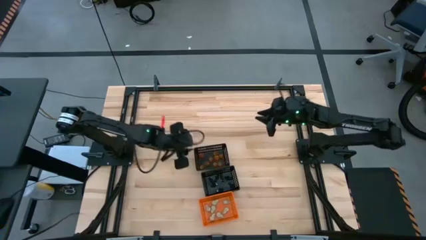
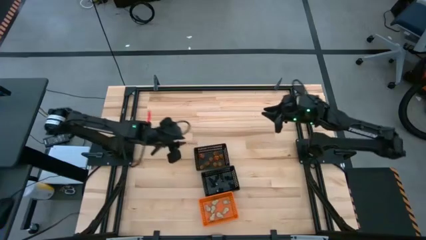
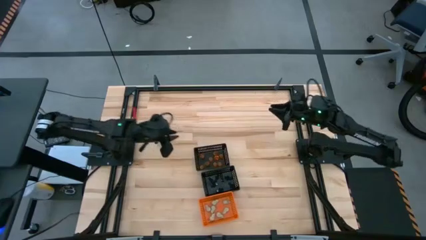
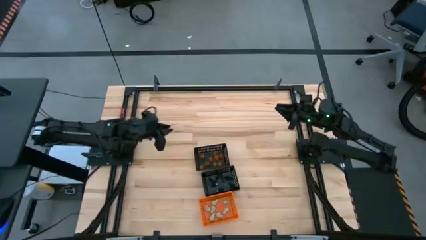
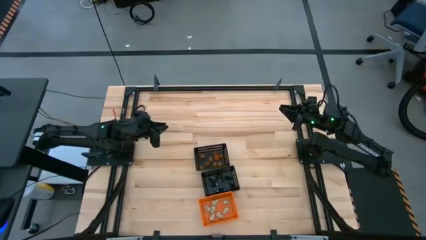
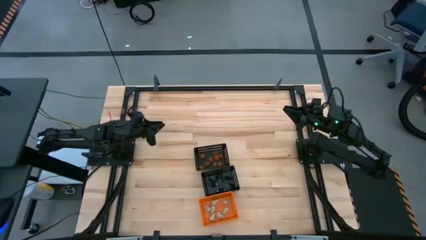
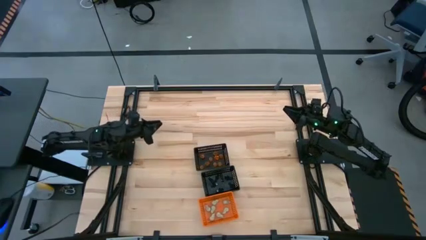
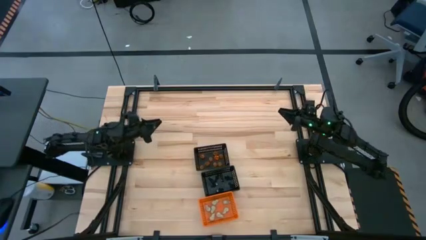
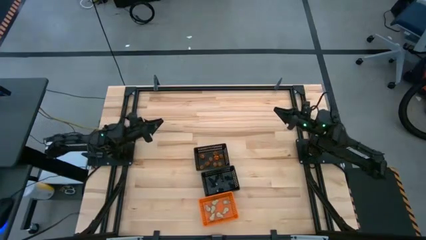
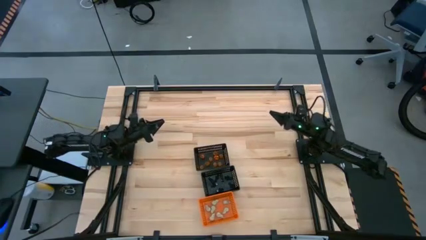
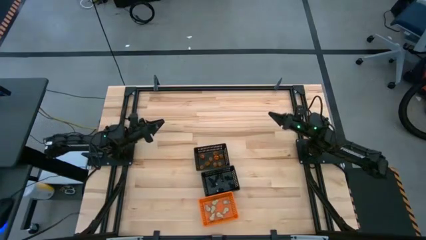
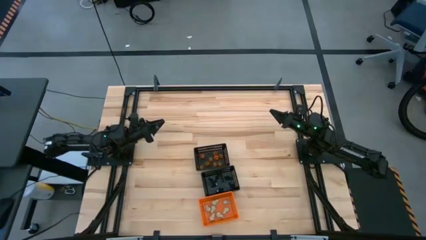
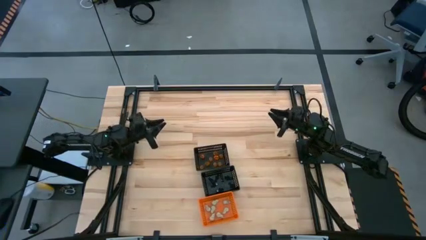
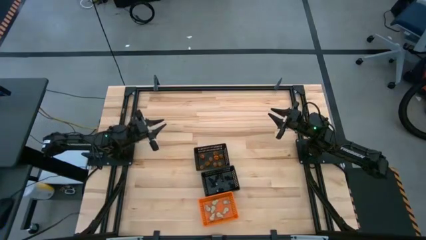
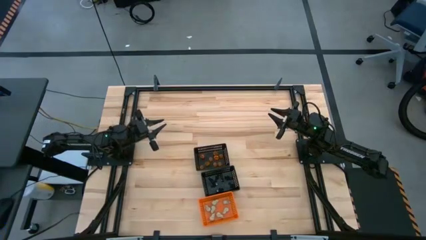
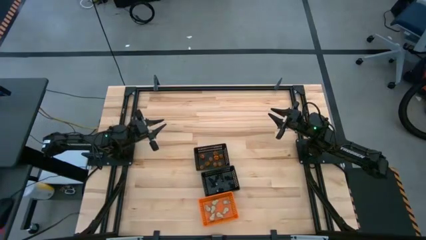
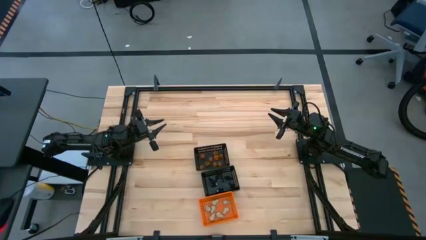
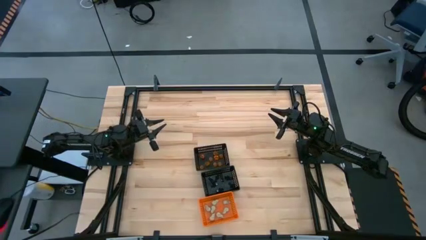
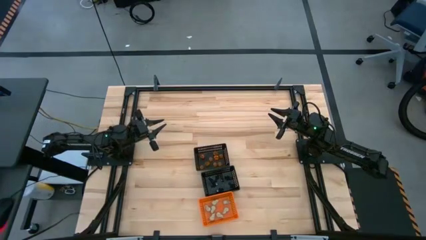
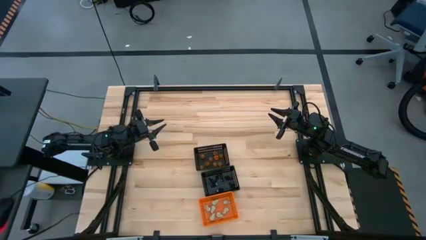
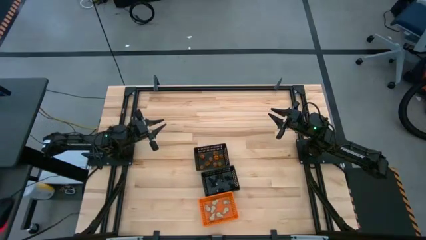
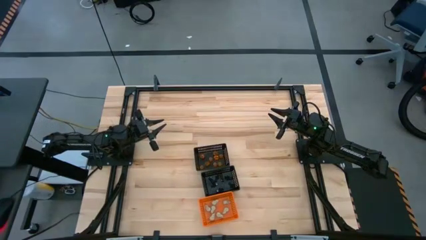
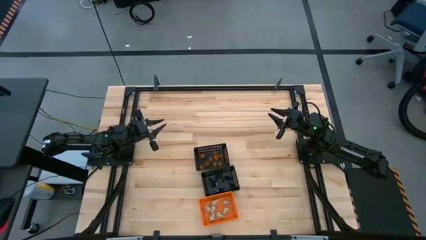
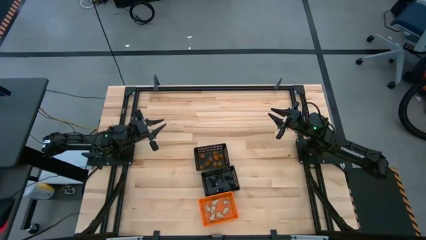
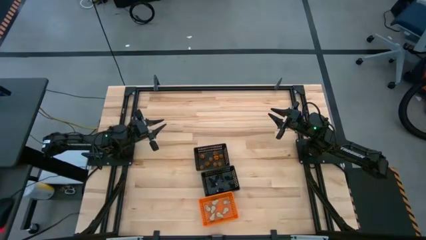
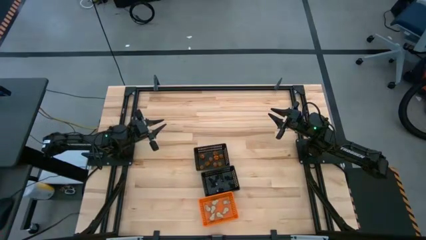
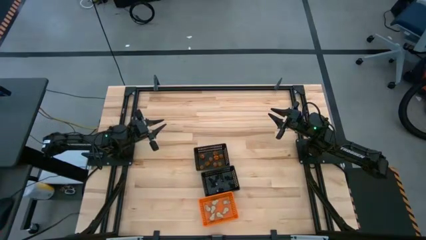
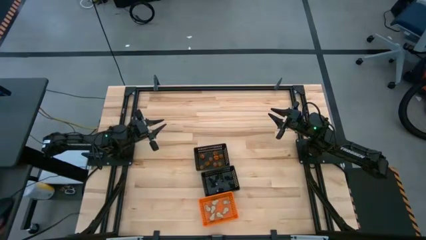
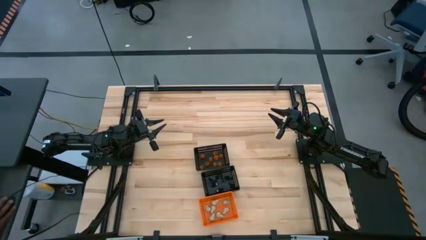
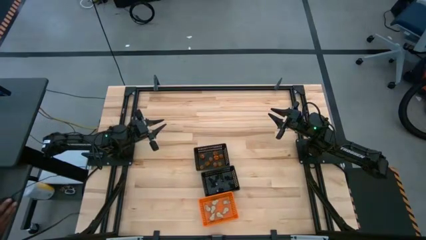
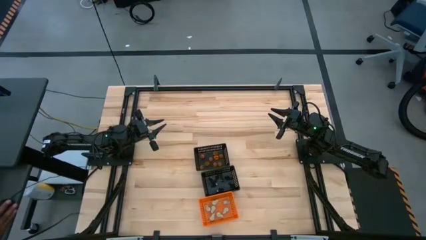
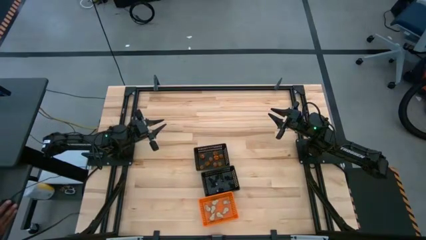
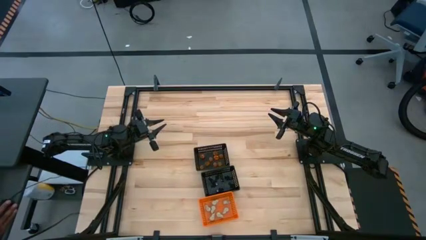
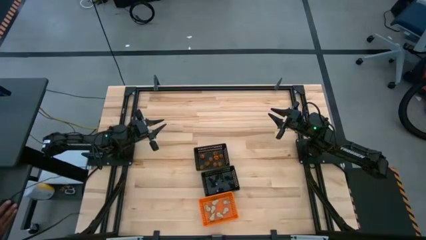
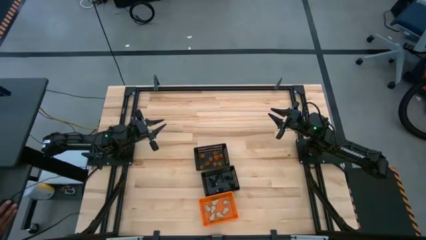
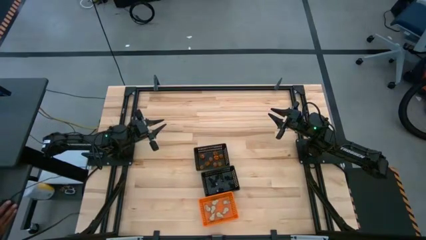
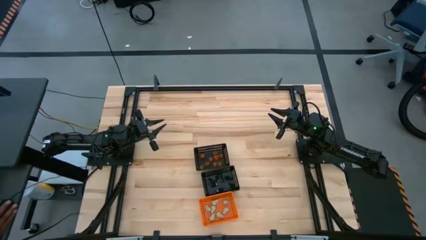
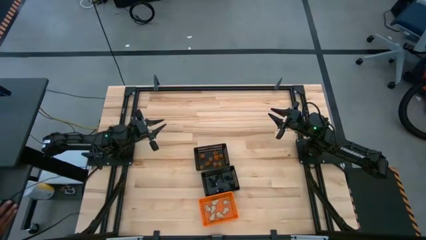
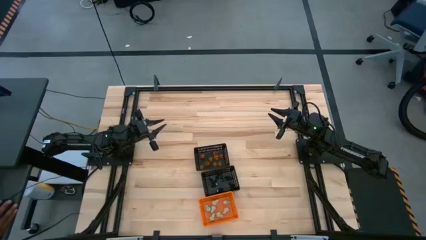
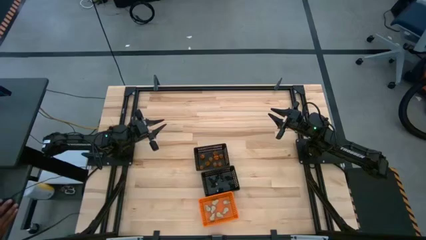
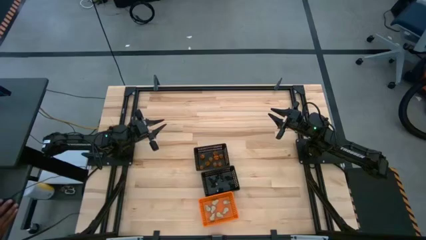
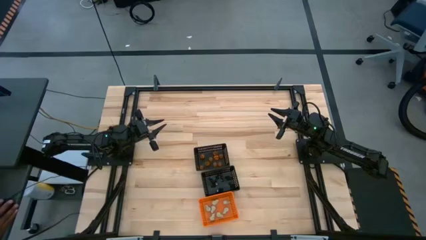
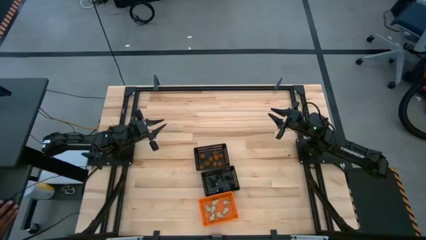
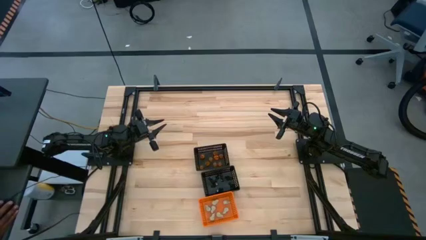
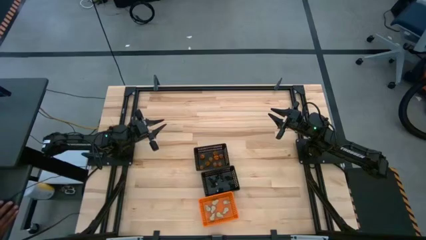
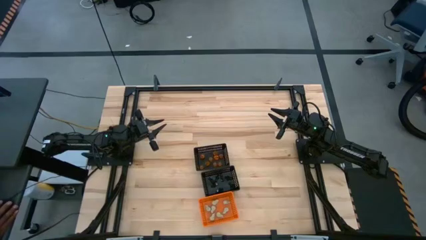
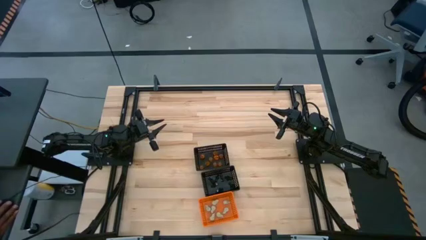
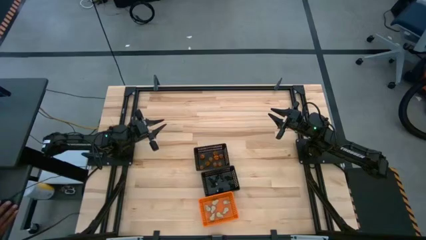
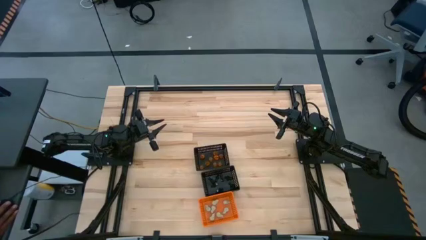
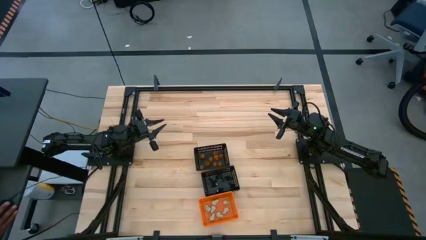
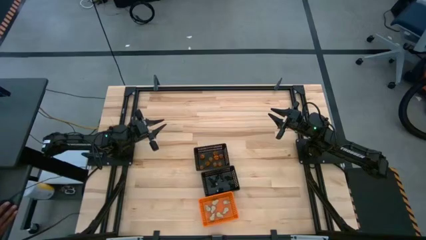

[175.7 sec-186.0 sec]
Task: Sort Halloween decoration
Return to Home Position
